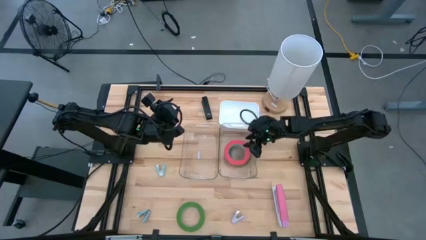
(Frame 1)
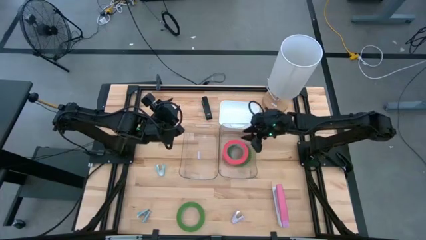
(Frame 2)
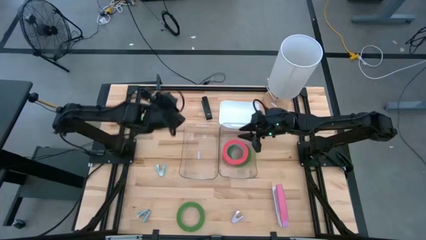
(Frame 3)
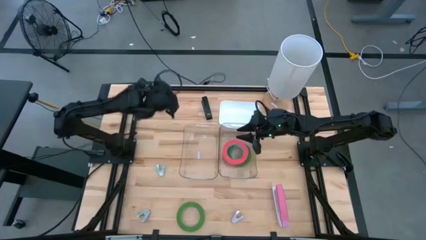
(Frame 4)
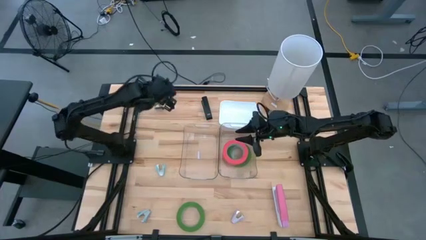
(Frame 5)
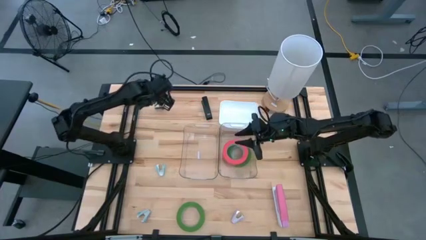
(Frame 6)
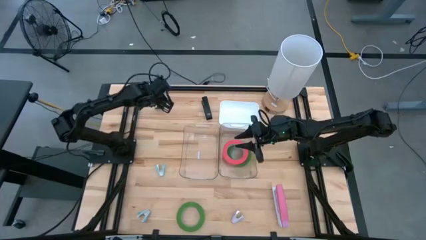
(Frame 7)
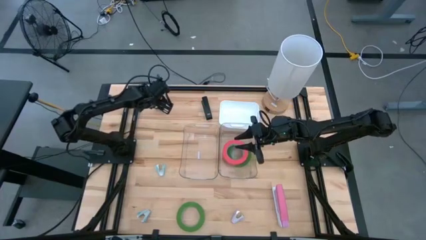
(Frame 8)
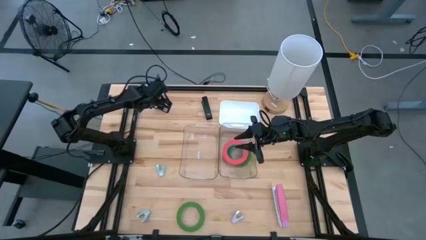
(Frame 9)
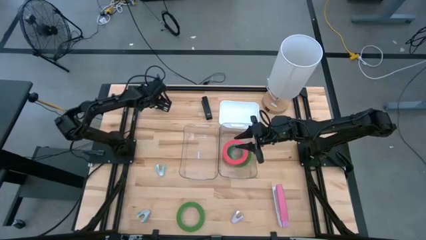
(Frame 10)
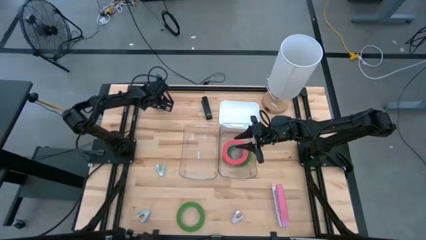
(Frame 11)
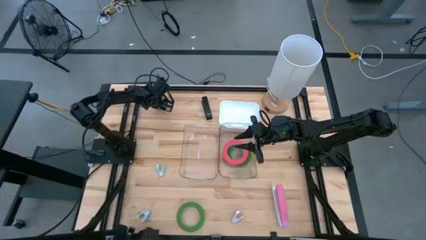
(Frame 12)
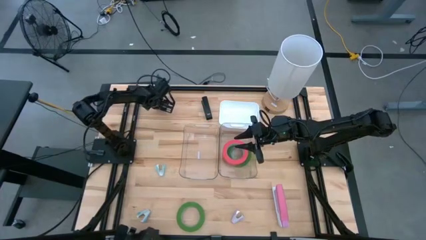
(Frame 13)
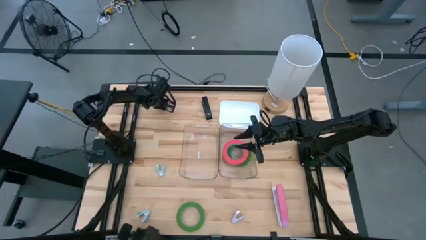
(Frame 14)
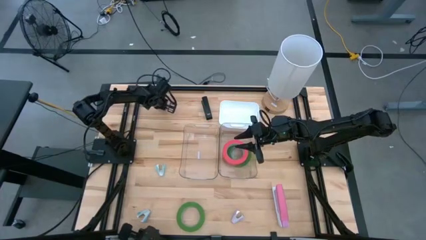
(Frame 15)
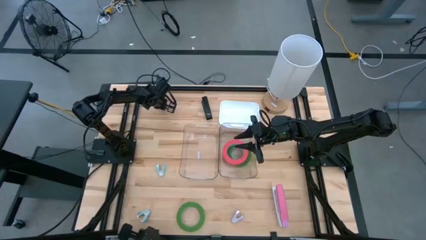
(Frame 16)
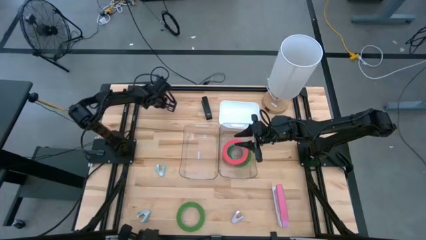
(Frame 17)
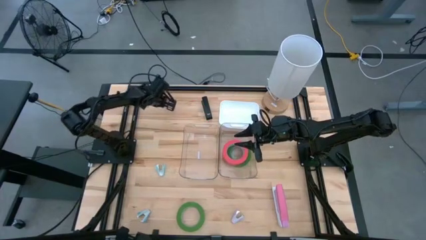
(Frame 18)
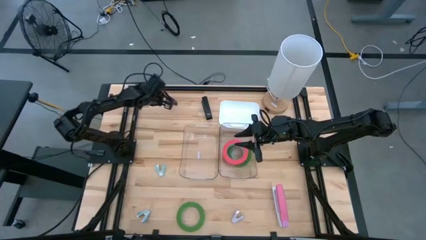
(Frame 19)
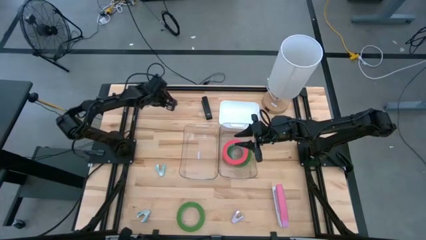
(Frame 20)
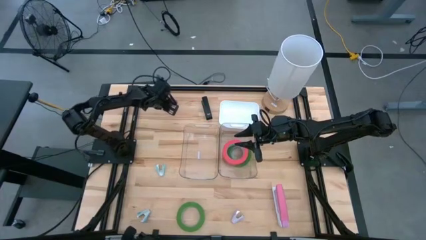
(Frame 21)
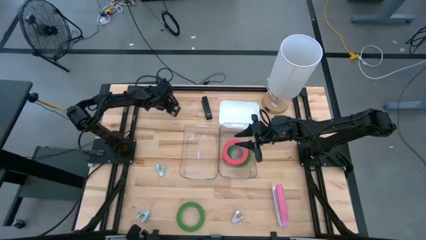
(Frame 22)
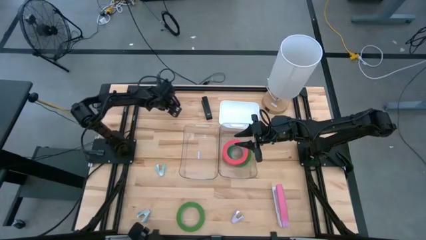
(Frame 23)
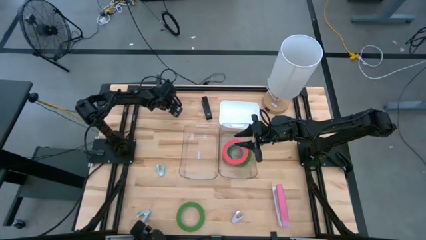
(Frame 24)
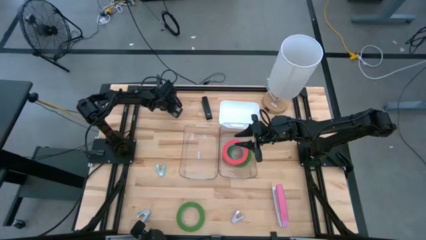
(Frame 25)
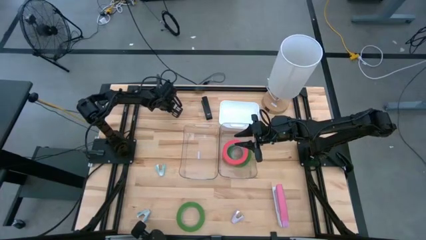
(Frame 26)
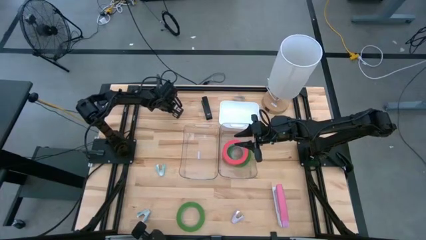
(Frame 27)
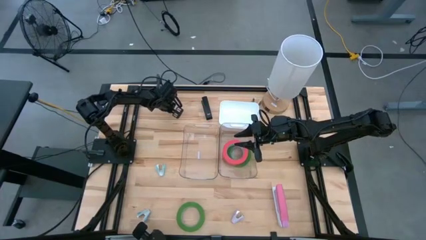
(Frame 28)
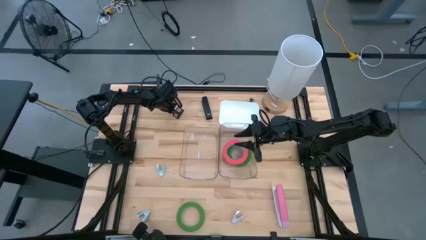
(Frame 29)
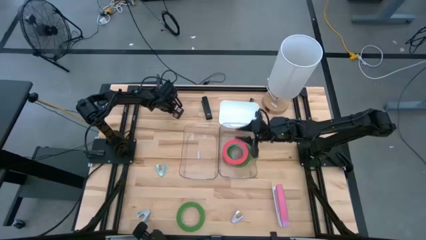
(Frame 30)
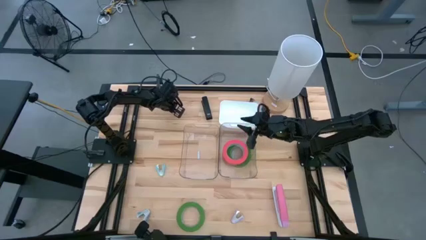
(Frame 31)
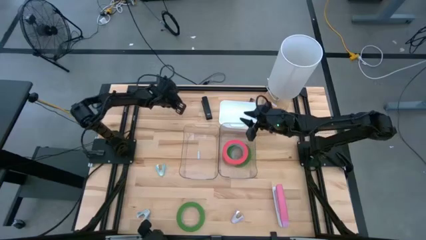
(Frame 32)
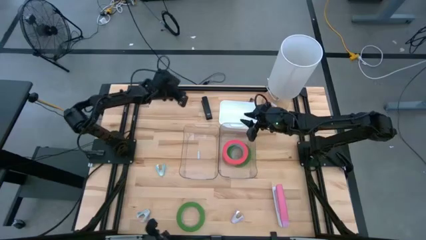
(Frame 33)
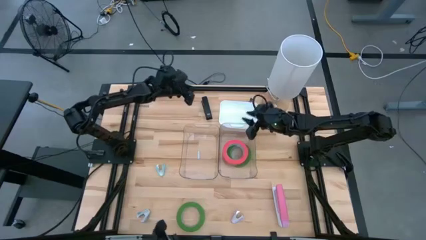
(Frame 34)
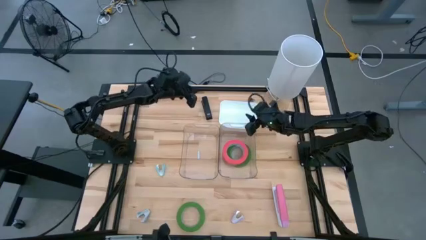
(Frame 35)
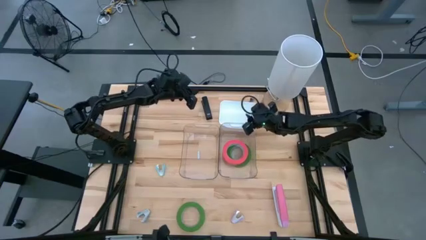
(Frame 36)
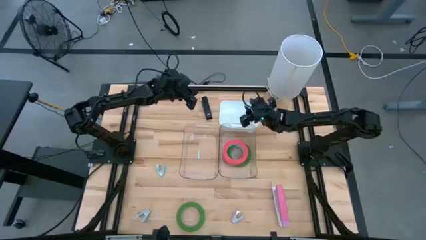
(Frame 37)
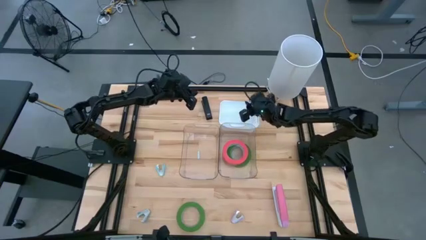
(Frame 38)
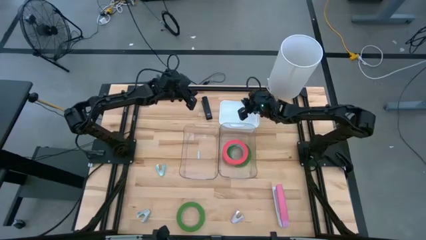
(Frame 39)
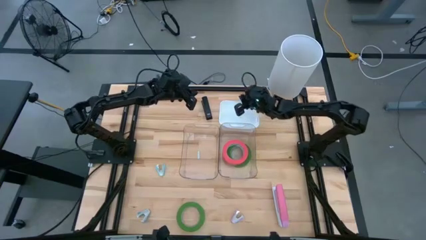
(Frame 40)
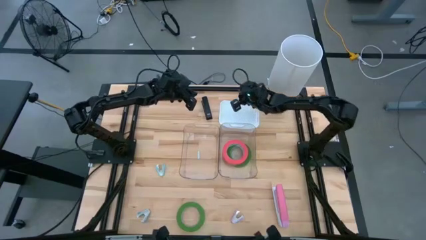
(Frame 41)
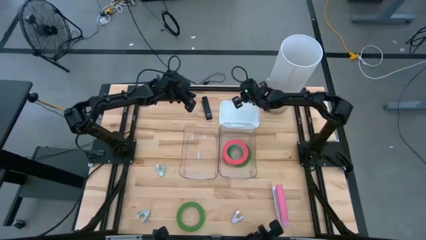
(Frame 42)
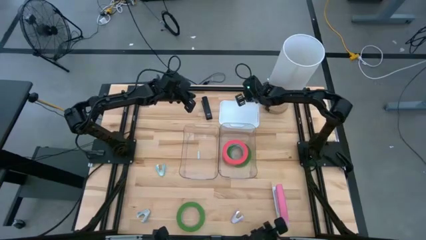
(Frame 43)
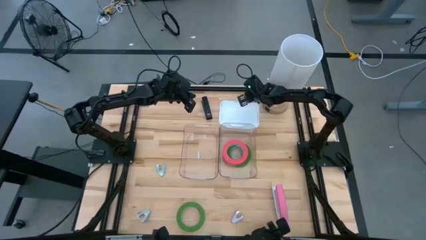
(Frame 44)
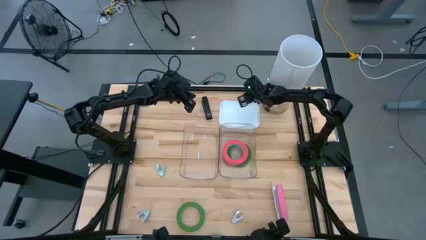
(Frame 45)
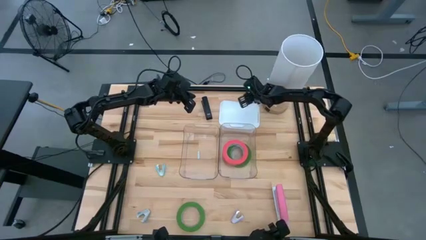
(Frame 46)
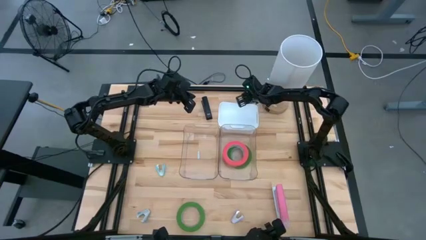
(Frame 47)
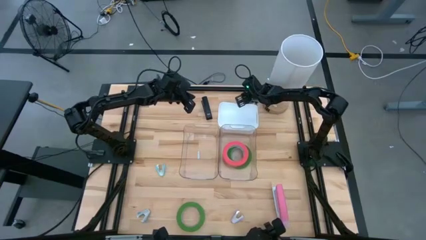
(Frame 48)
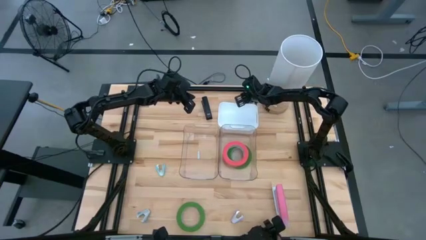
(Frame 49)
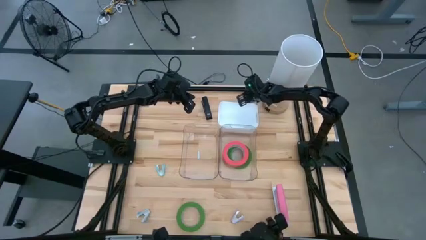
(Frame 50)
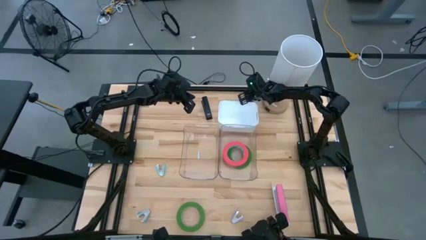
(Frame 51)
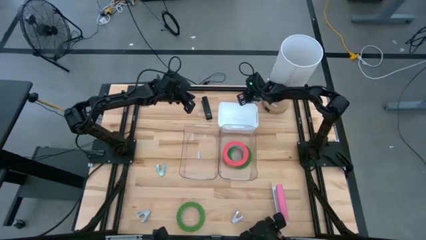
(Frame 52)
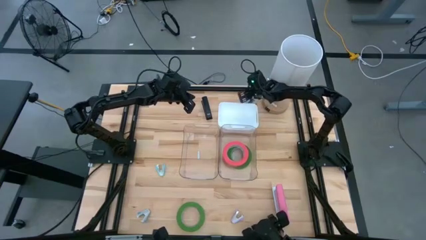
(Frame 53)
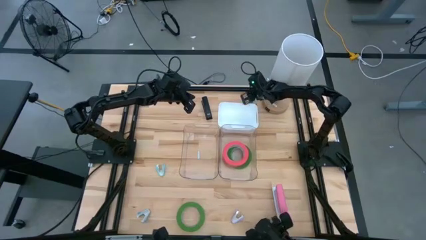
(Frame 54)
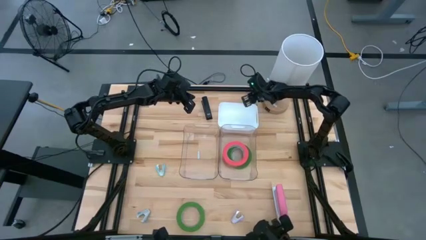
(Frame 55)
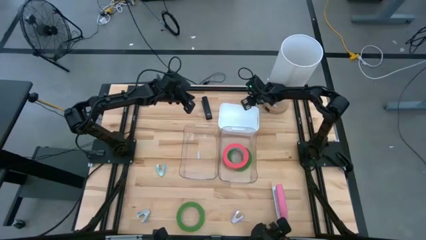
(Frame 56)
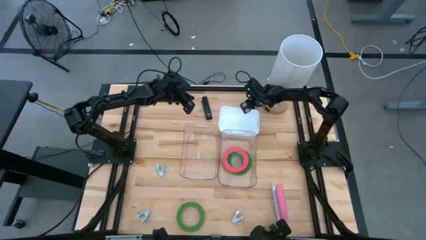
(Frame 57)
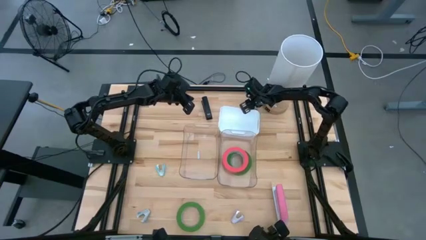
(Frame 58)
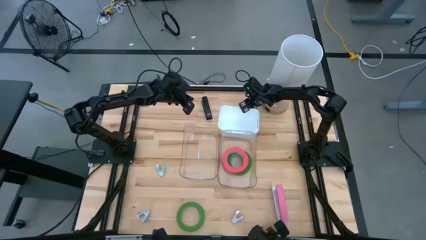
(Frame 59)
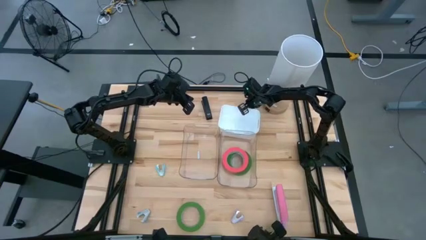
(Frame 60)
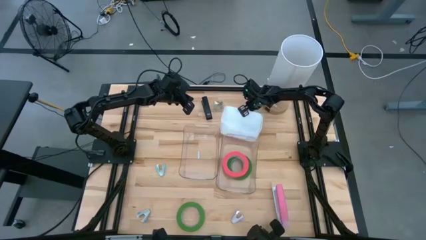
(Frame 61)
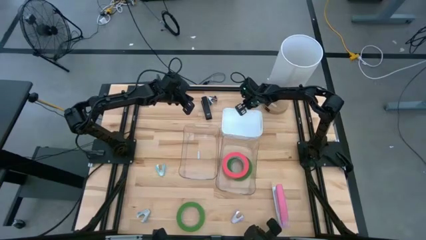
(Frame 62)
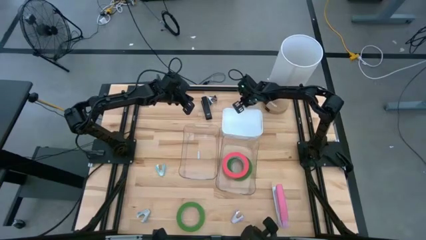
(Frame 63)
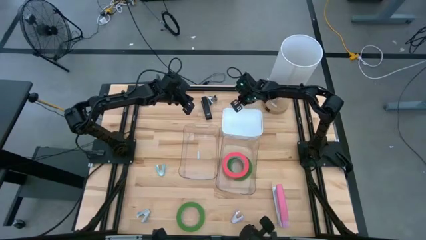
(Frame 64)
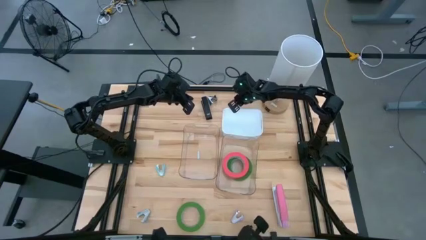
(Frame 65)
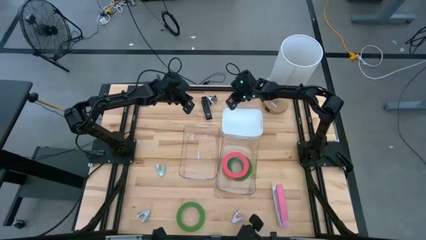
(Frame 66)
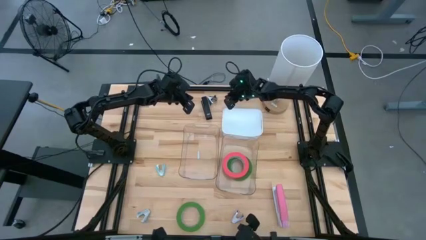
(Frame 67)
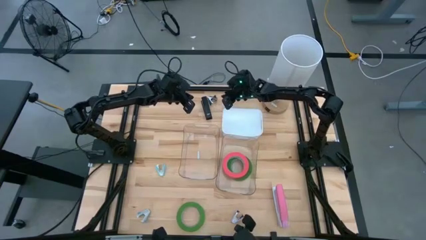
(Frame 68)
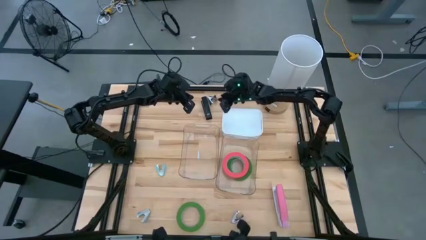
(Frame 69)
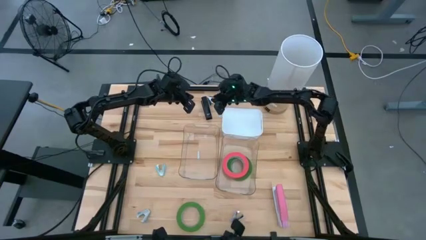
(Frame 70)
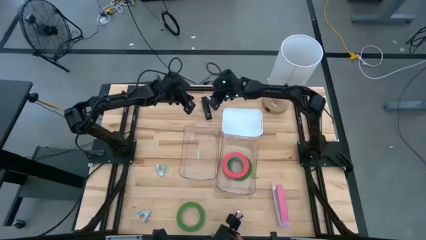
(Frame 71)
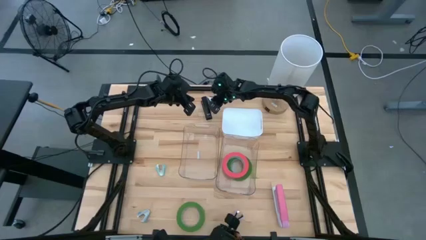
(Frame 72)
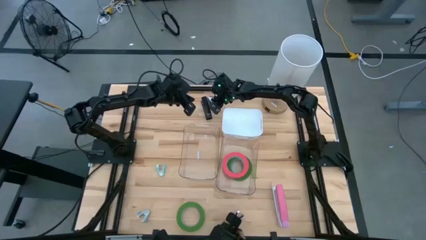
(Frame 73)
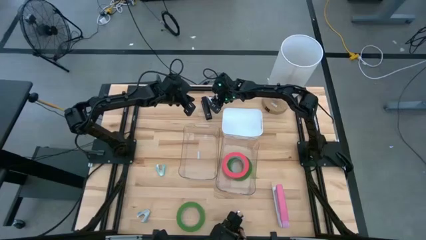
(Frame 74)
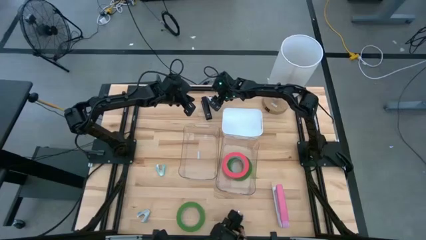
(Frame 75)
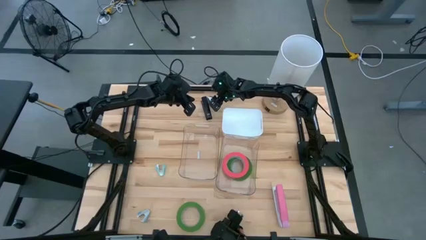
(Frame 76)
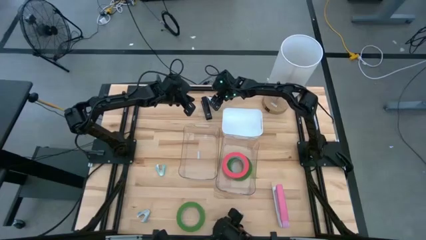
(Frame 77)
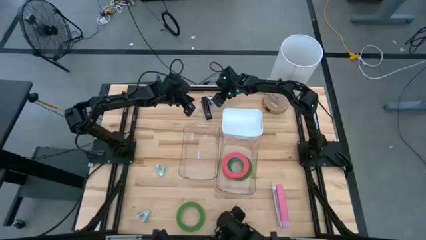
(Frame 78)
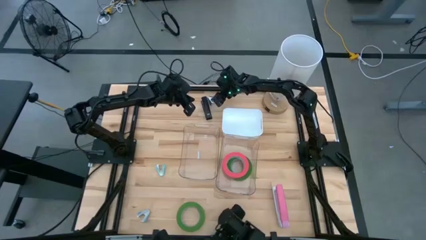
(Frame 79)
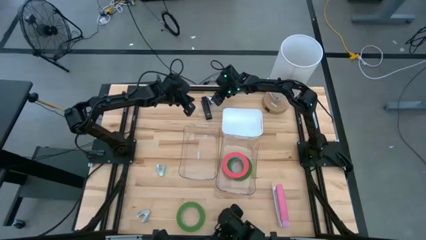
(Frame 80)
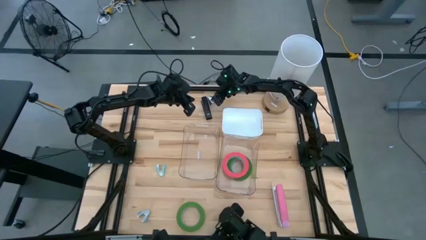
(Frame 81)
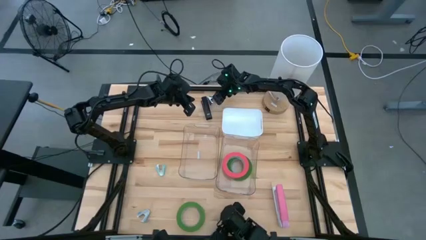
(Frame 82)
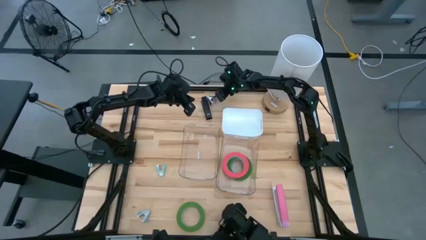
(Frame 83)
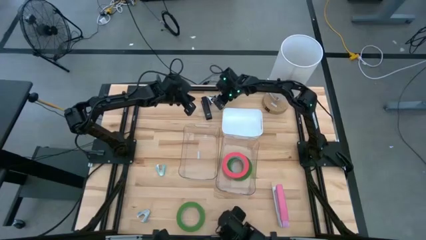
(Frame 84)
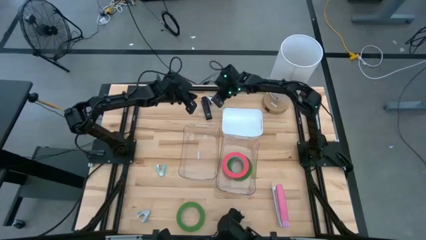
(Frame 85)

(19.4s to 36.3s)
Task: Pick and place Stapler, Stapler remover, tape
Put the black staple remover into the white bin
